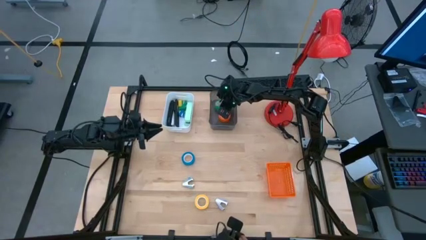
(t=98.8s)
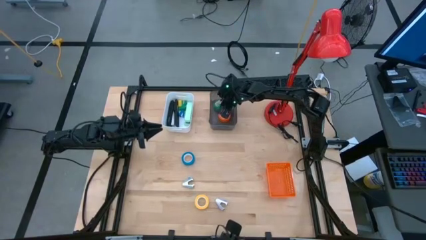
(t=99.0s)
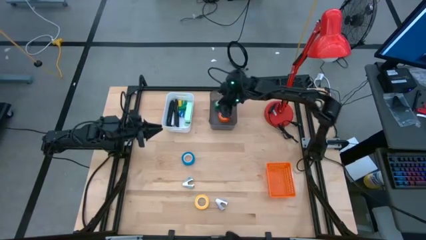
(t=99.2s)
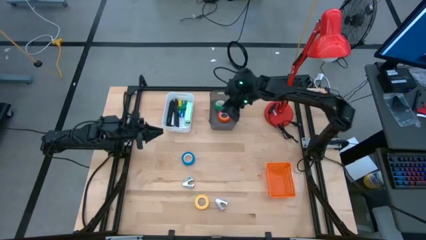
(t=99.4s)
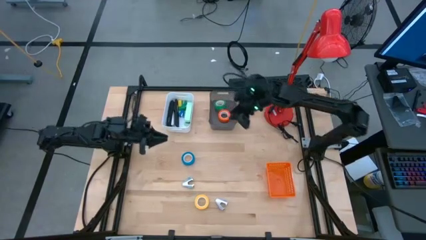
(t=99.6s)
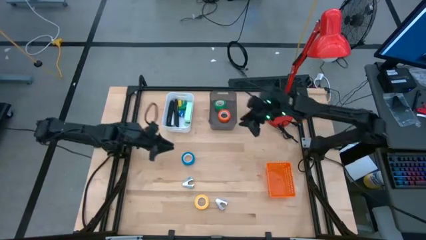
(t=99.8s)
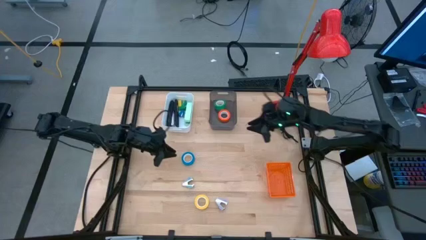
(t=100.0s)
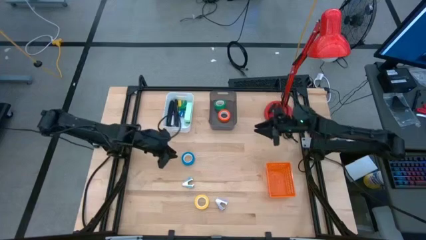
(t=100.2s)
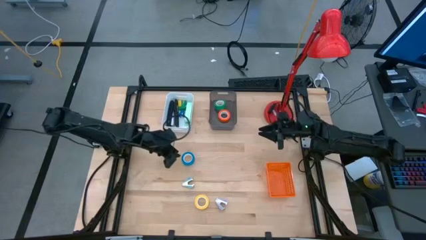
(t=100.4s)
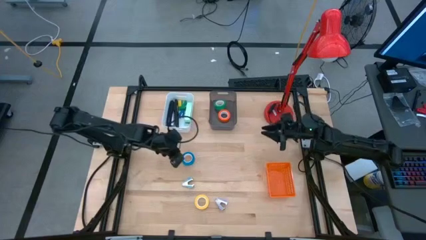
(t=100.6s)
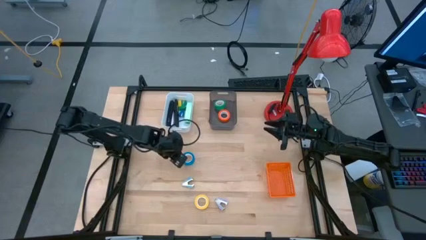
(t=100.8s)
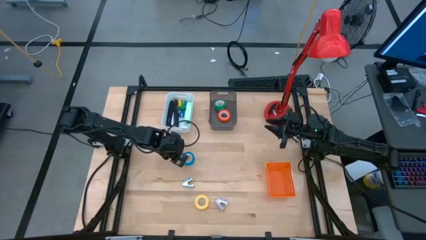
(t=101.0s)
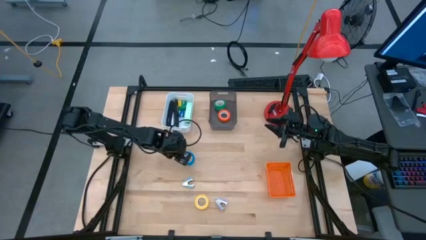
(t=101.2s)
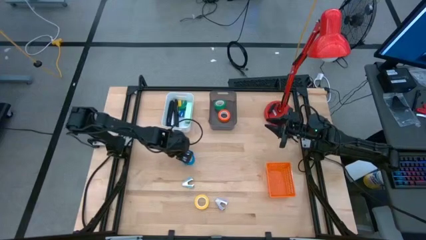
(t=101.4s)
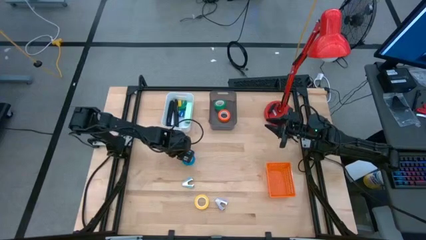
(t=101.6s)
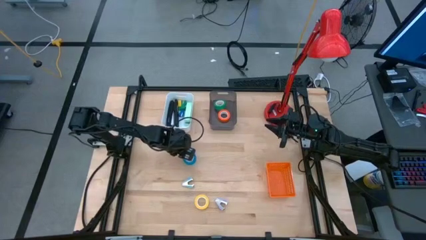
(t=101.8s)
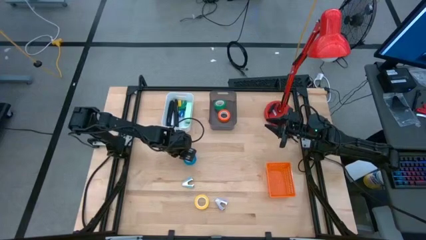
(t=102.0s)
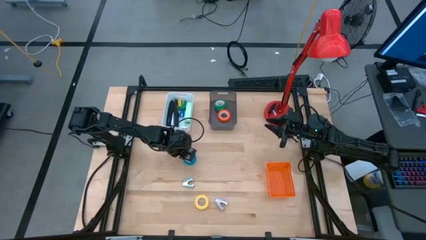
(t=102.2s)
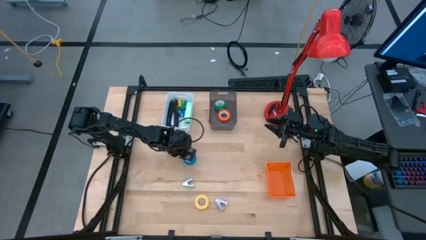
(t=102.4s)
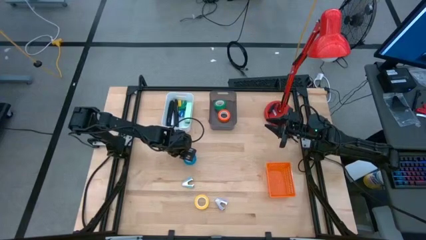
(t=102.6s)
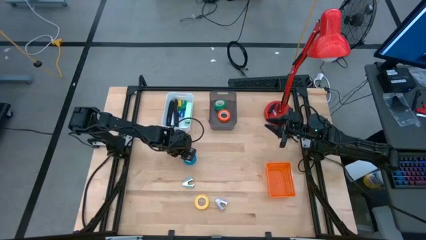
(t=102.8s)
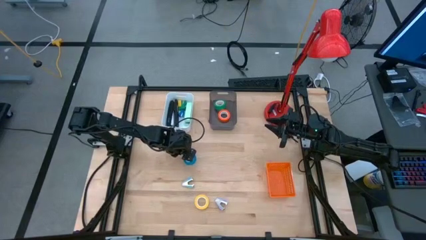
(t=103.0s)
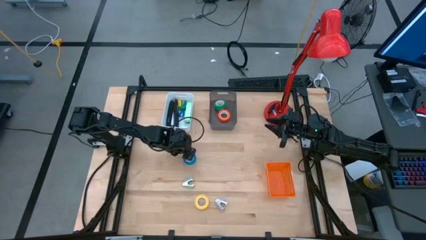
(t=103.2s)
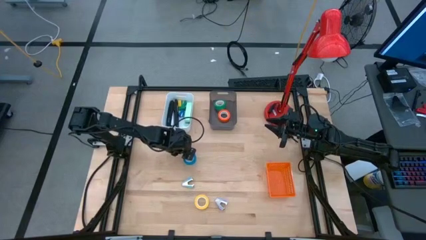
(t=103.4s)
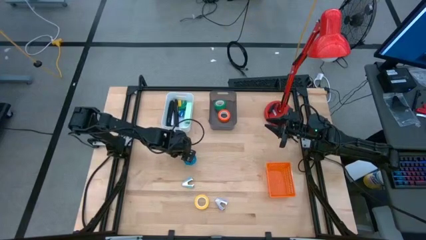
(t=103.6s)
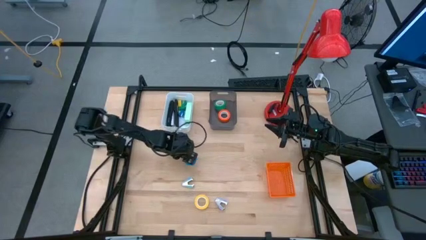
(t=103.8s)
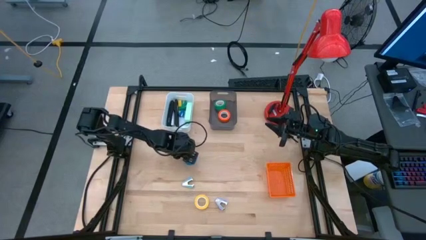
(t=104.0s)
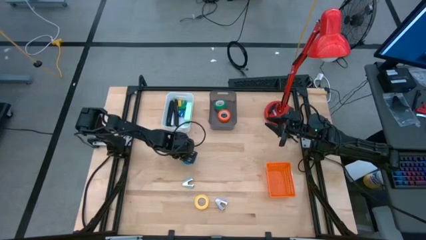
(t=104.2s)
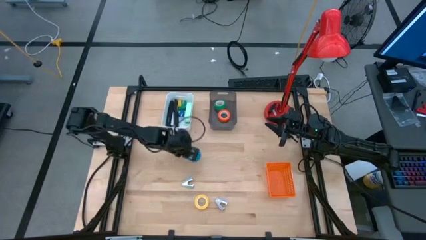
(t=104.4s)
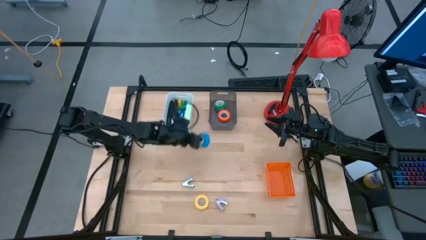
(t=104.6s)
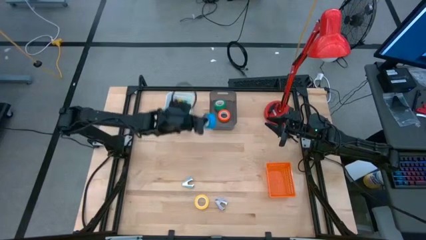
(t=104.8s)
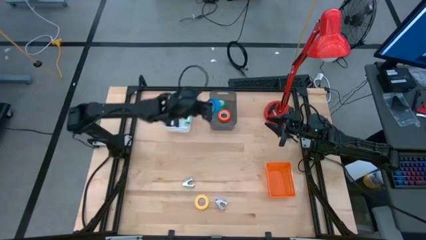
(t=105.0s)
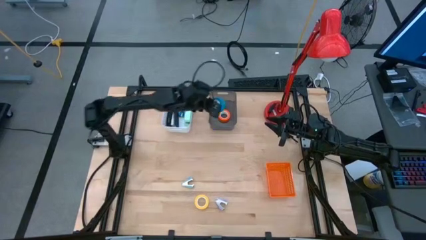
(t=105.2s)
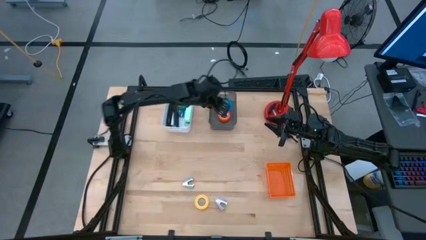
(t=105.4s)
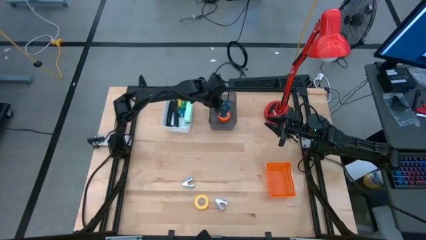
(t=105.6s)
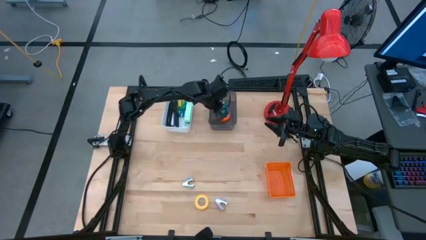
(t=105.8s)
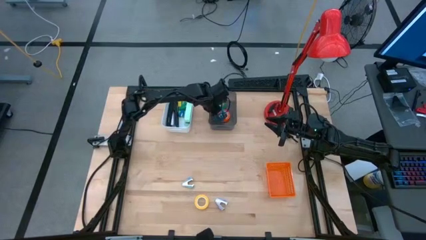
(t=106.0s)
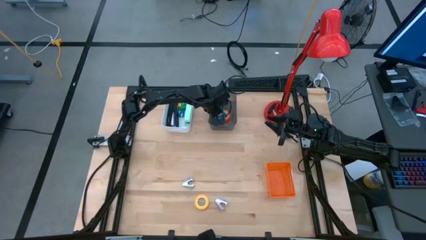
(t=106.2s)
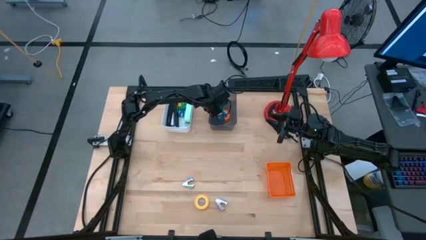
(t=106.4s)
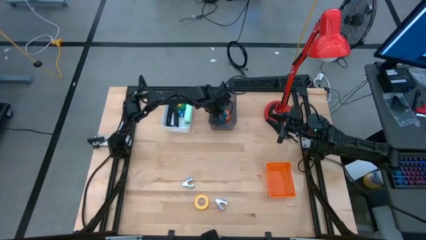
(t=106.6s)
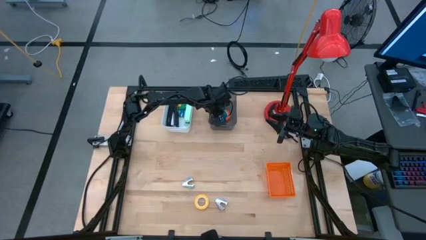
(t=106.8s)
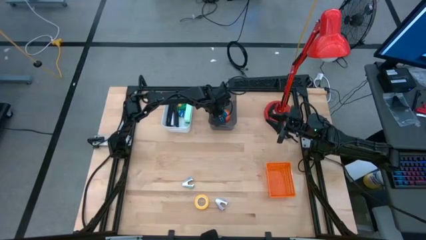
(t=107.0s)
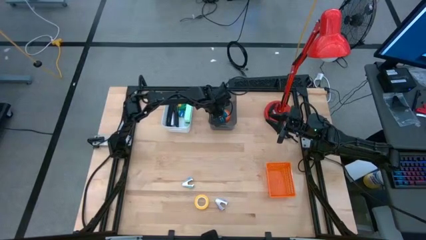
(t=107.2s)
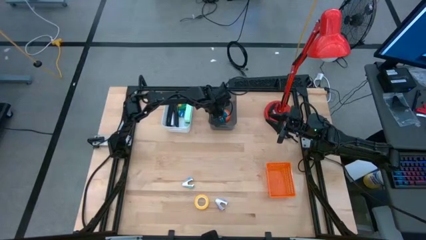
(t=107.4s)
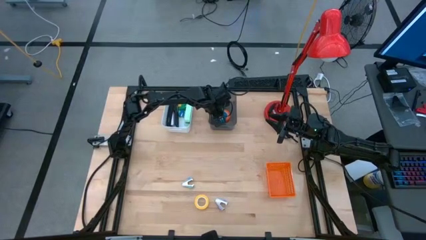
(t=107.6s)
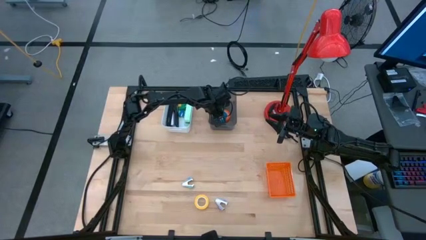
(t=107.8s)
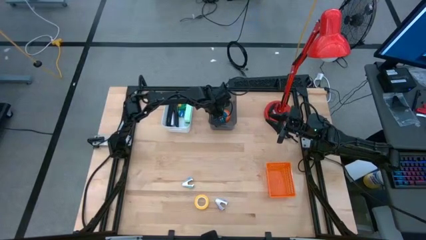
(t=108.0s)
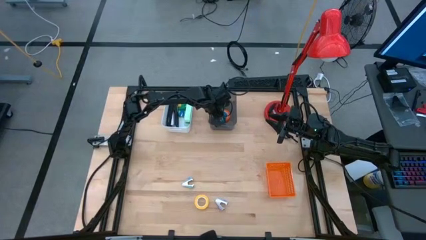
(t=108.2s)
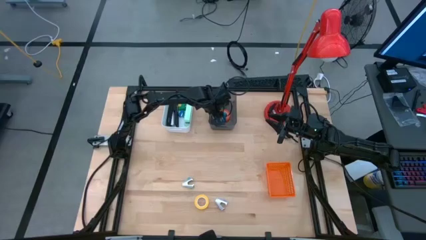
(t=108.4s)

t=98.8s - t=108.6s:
Task: Pick and place Stapler, Stapler remover, tape
Put the blue tape into the black bin

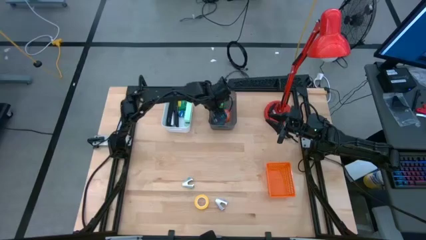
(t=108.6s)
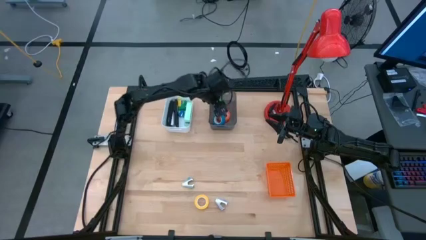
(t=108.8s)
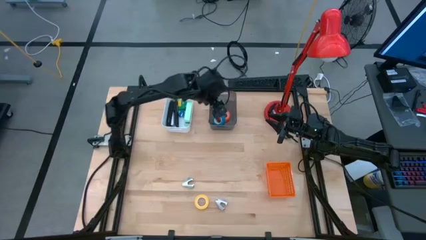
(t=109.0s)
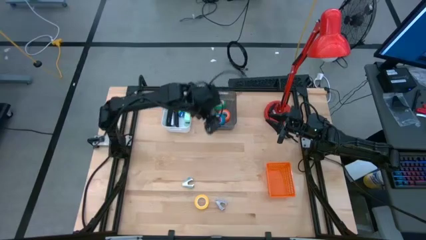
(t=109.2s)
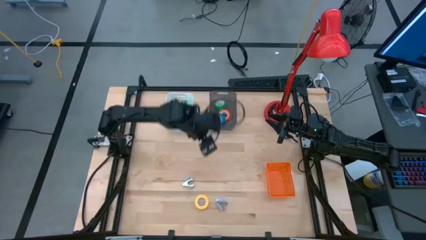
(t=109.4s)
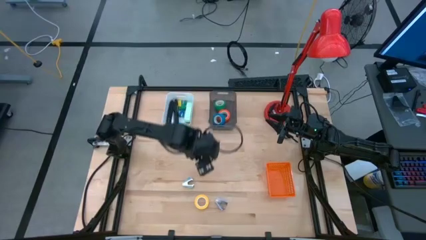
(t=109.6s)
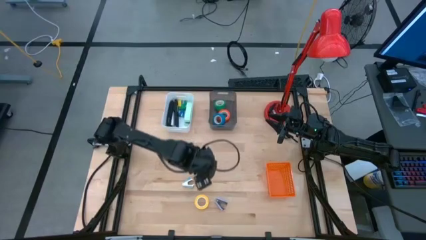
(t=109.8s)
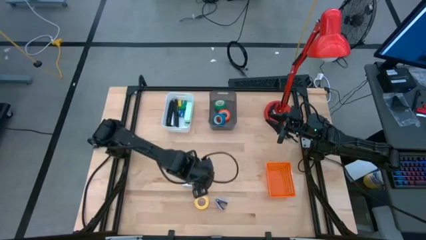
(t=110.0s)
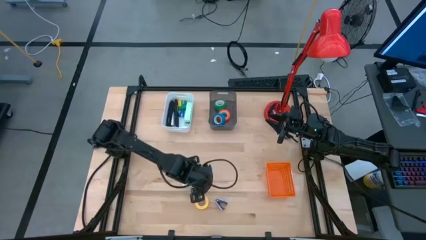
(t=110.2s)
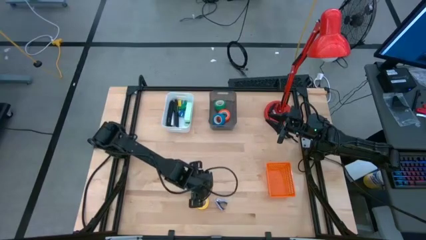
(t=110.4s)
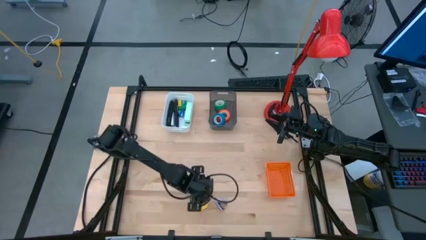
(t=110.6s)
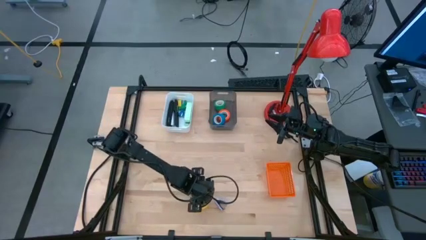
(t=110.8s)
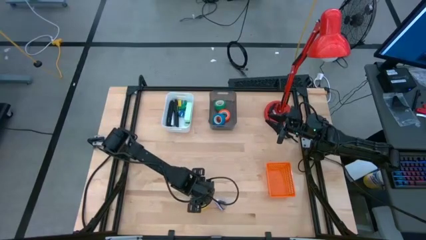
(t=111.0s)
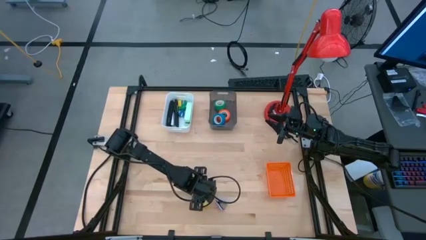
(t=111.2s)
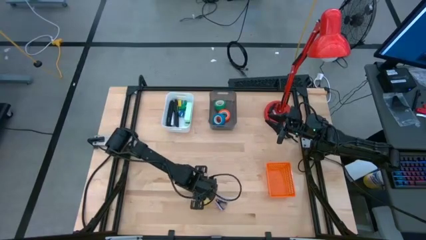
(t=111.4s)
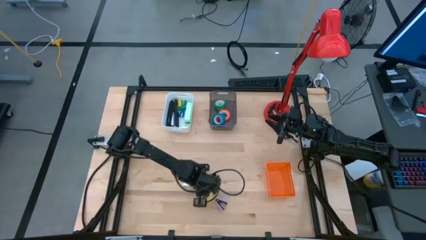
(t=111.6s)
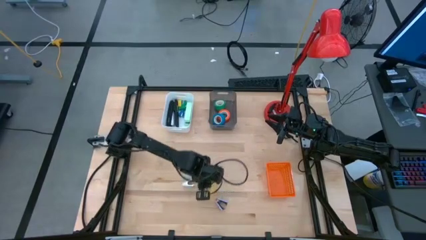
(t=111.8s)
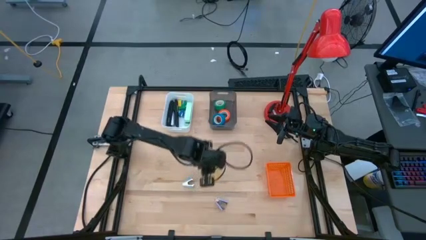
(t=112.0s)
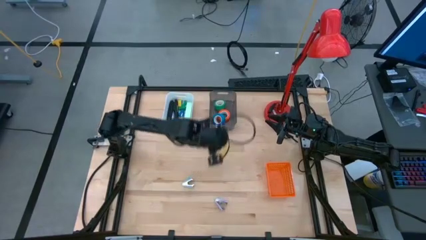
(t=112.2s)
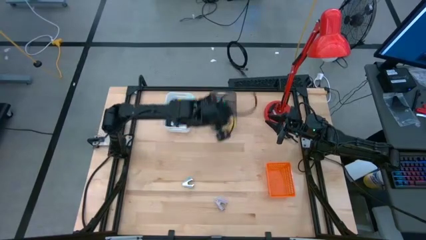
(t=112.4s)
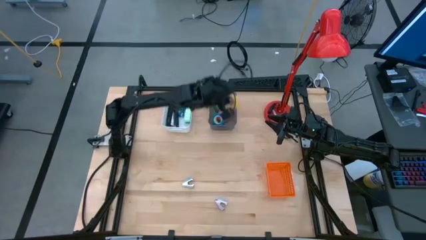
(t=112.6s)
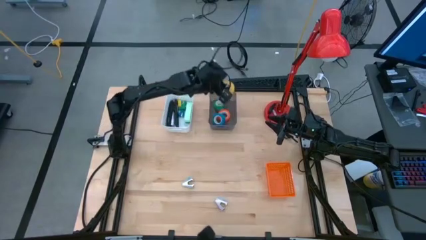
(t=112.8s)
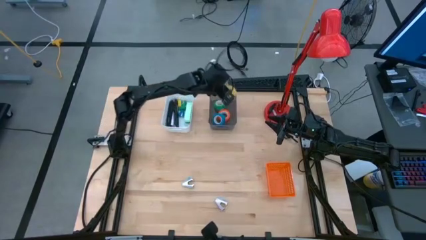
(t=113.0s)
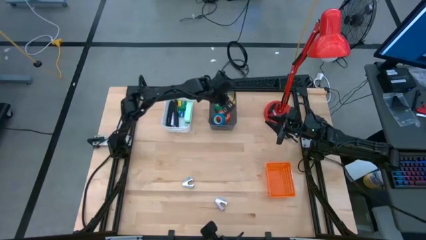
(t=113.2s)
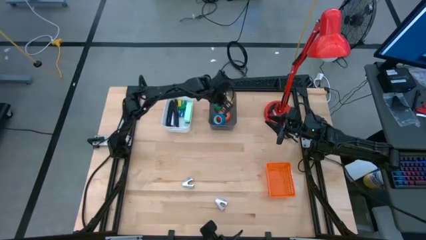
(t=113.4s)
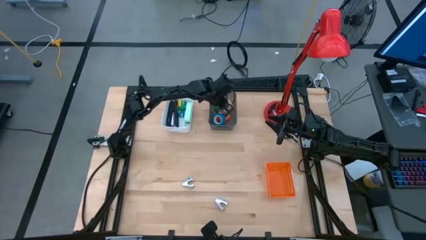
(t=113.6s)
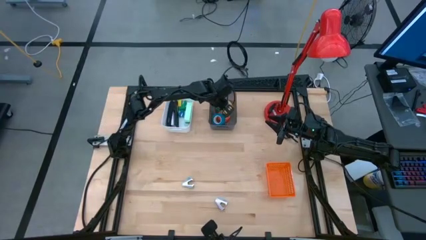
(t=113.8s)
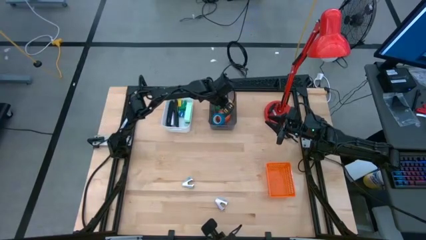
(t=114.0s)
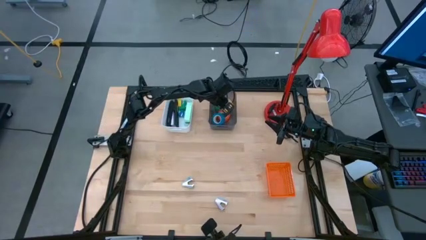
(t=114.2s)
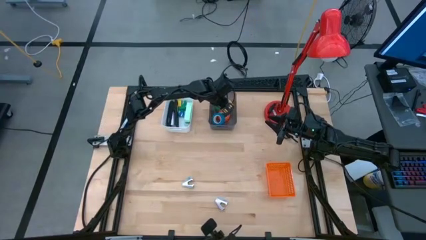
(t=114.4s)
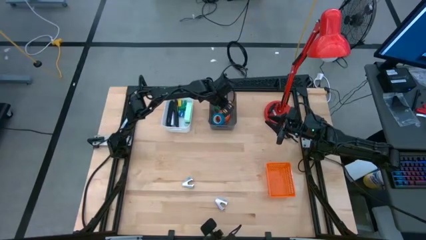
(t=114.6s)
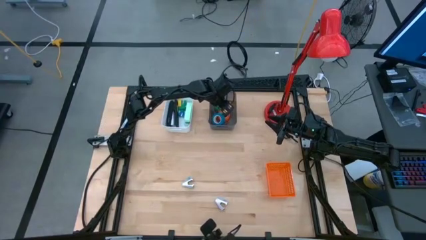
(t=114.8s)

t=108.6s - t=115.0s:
Put the yellow tape into the black bin
